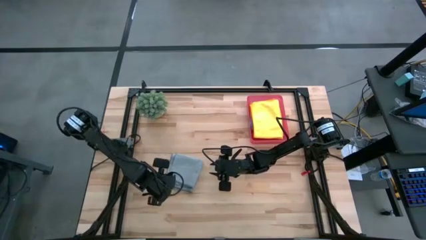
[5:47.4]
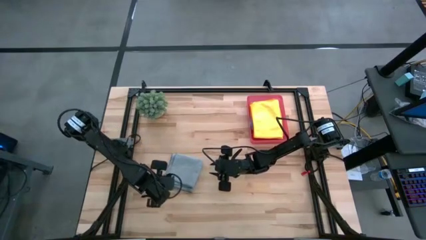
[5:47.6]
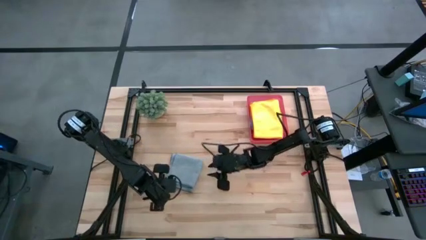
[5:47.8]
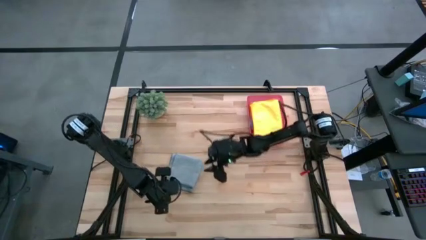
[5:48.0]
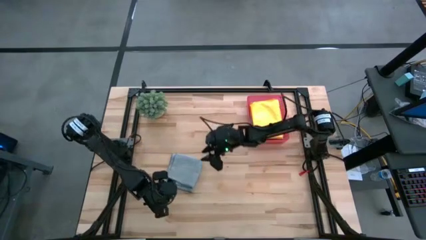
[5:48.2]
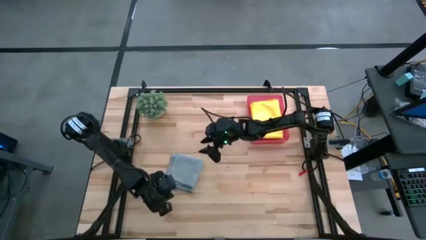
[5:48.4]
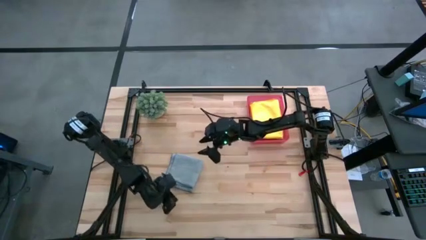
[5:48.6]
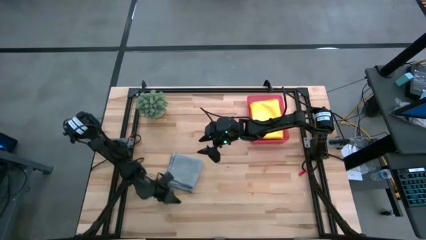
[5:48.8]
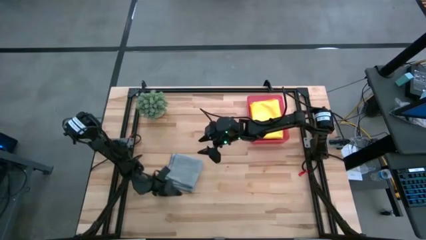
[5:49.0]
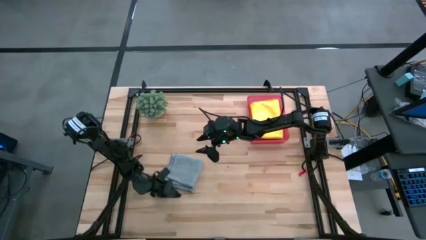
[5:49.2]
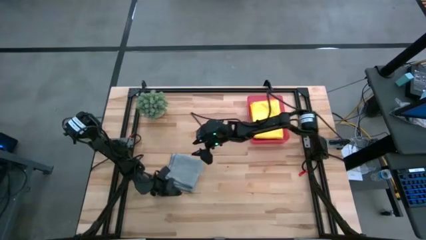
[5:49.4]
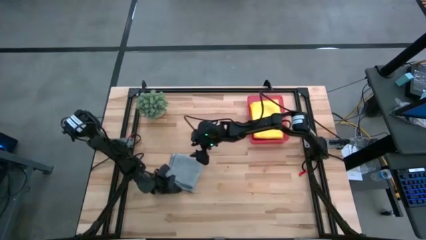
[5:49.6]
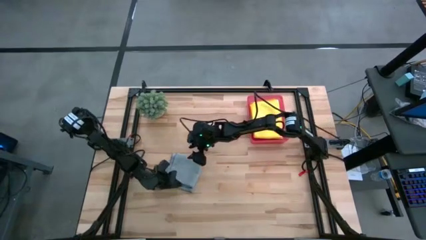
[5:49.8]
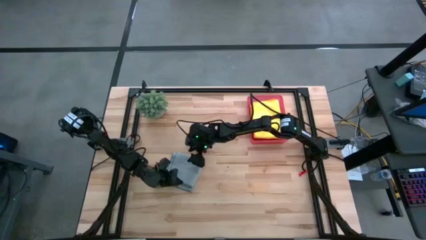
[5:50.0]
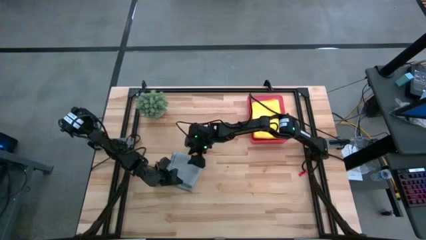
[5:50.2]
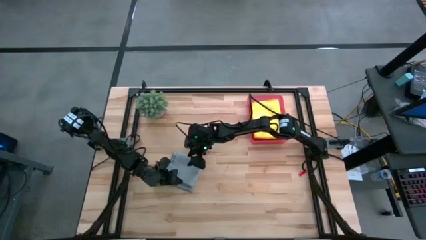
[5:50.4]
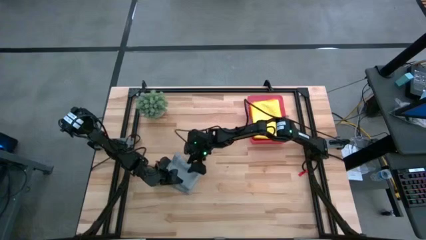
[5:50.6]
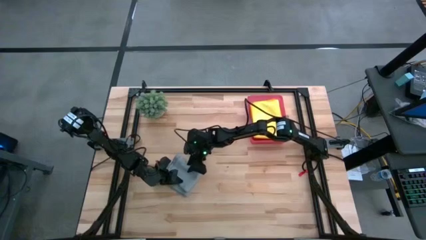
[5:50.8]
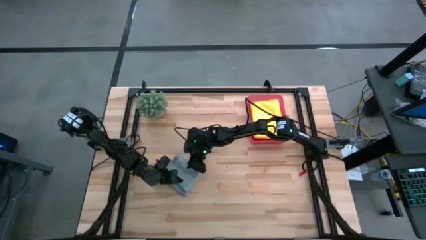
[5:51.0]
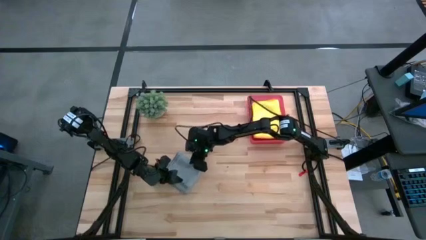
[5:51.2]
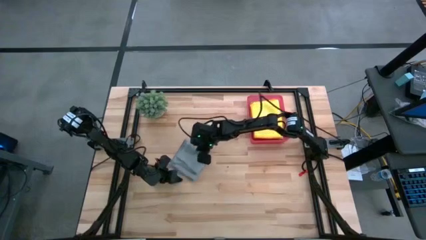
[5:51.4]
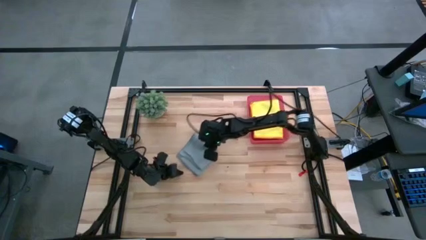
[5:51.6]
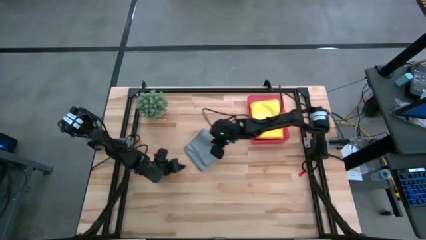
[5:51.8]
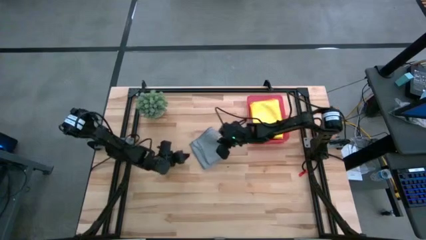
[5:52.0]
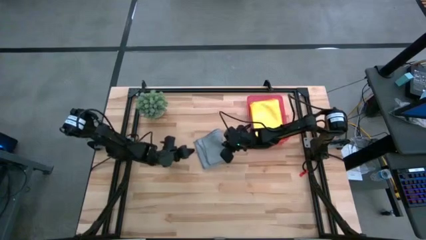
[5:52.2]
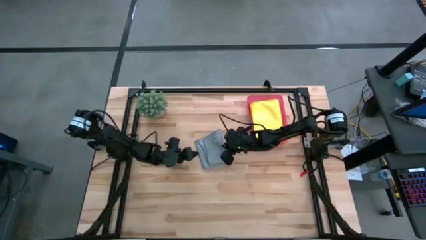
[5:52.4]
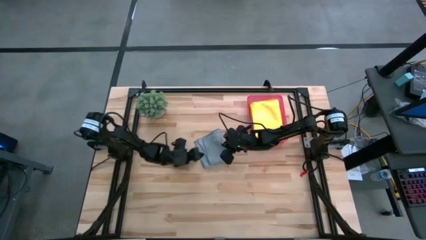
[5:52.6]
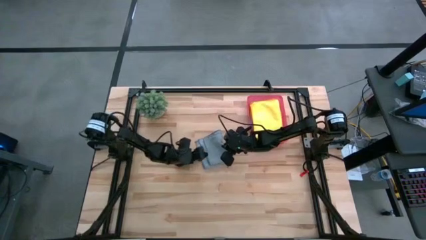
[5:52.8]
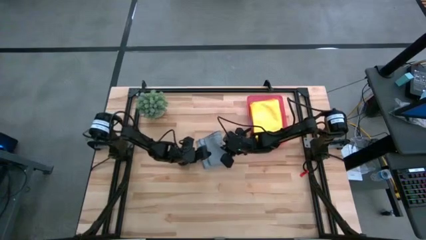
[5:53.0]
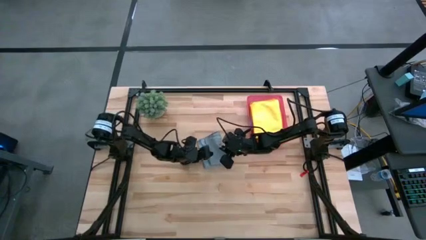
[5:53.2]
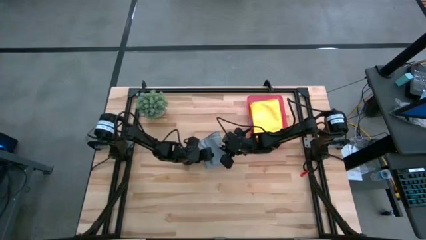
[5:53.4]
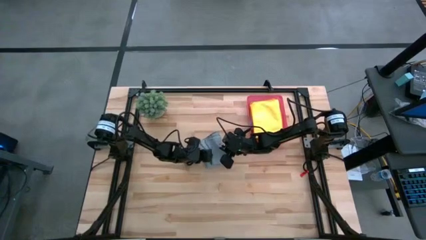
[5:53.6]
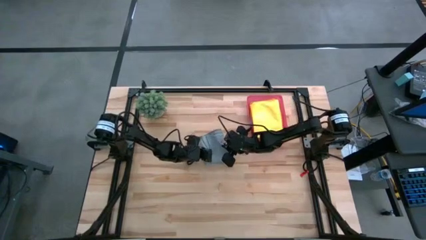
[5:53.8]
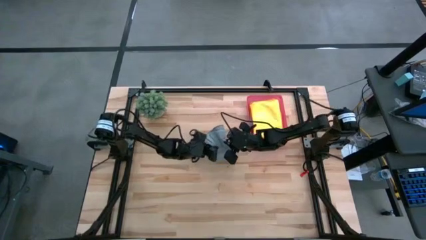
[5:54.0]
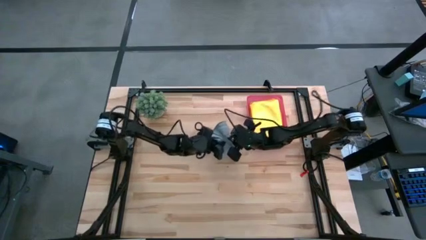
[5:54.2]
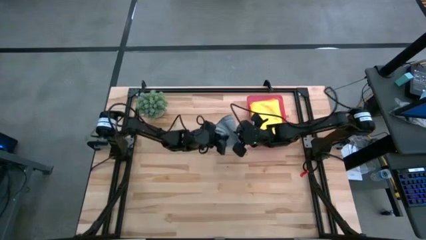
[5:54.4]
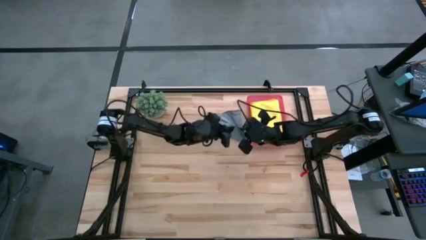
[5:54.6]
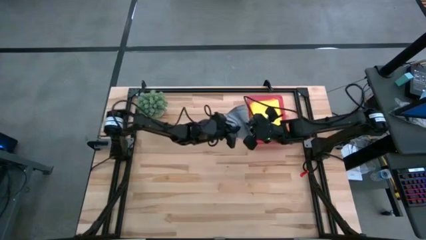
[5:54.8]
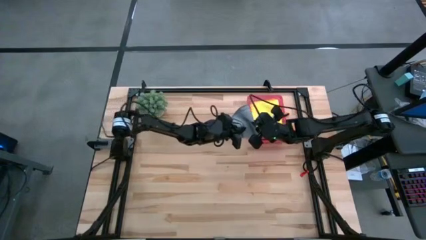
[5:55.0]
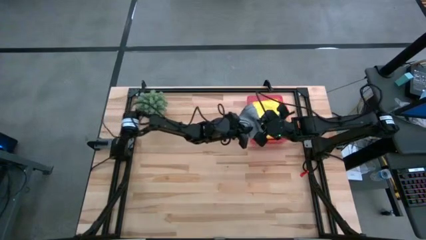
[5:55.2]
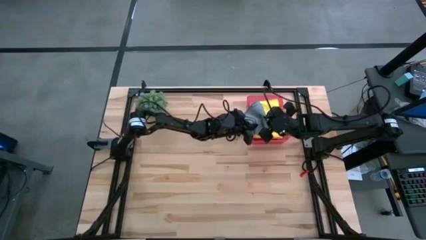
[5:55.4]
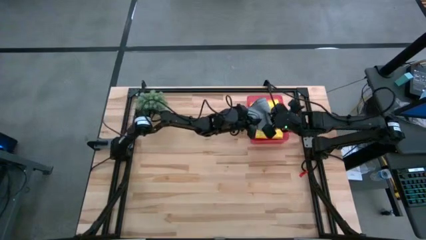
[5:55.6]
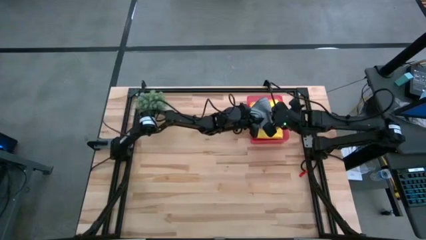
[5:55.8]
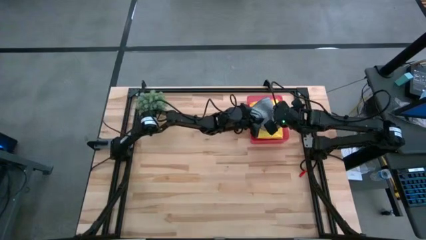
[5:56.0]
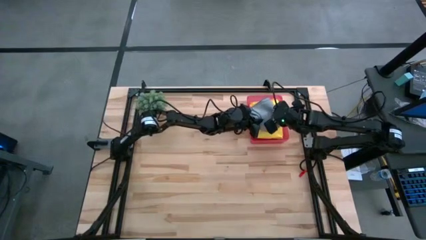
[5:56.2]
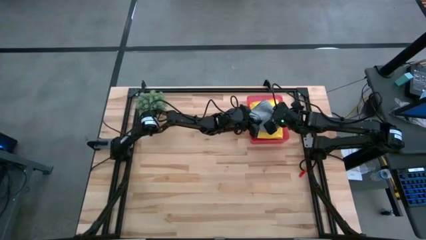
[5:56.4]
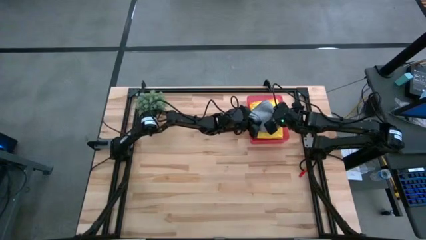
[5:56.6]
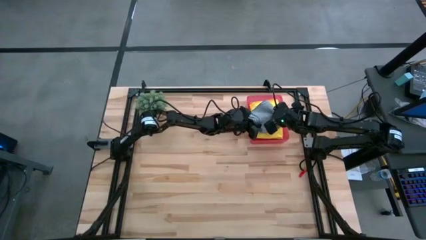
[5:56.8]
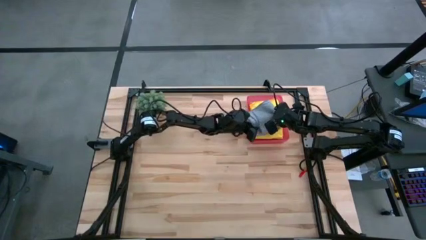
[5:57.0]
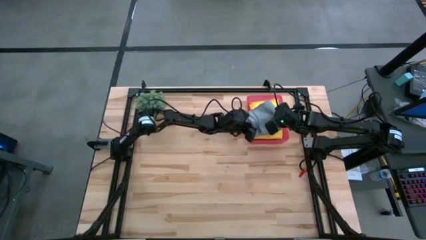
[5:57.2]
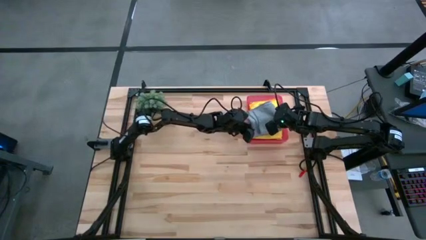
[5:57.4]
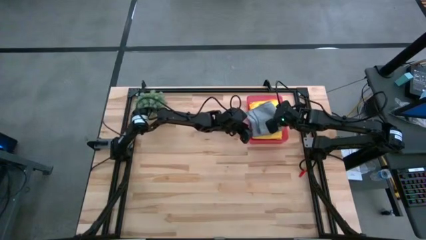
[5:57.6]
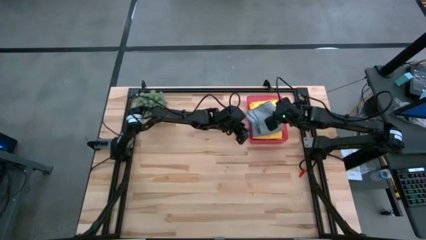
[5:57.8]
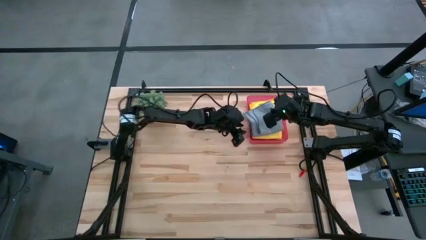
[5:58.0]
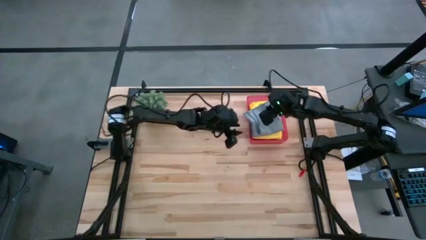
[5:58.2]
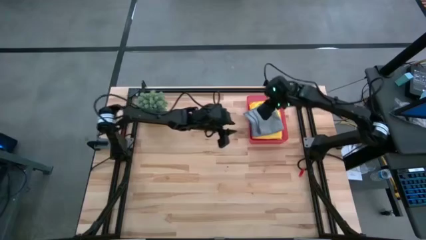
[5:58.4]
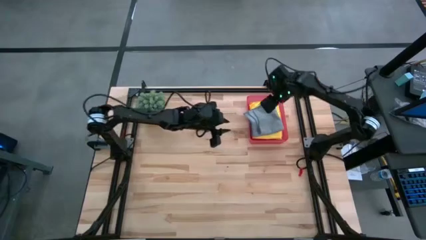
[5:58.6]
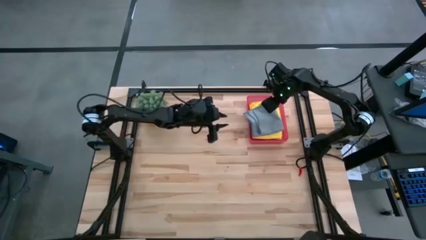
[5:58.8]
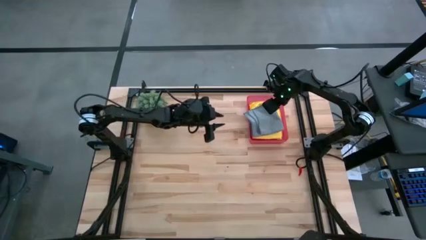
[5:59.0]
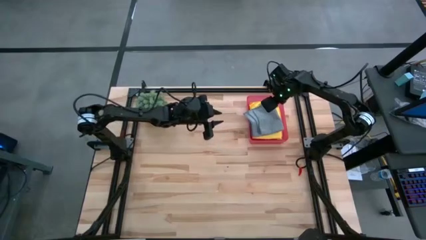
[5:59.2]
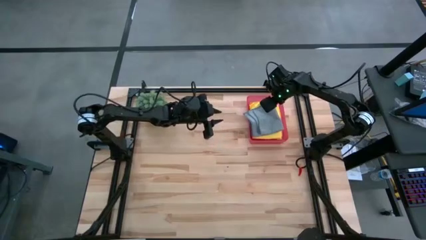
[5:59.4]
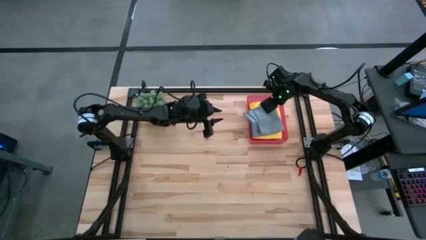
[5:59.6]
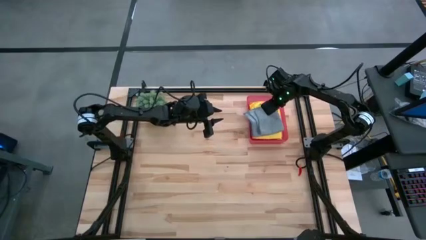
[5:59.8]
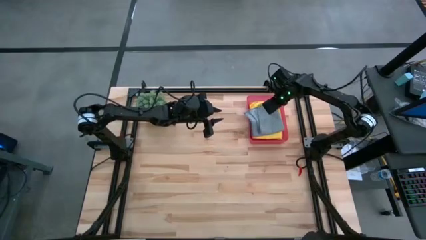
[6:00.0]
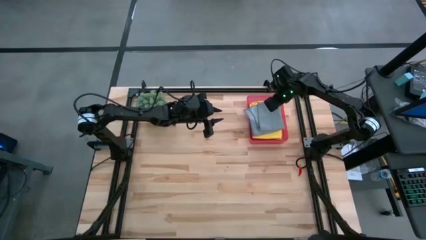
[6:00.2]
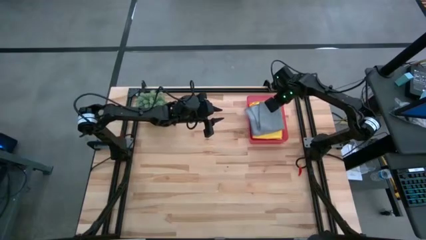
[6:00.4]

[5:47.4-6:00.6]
Task: Fold microfiber towels
Put the gray microfiber cloth into the pink bin
